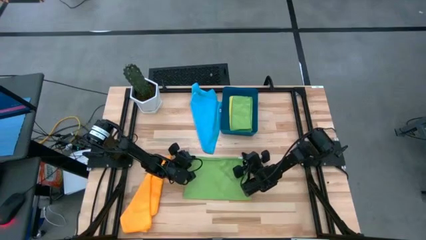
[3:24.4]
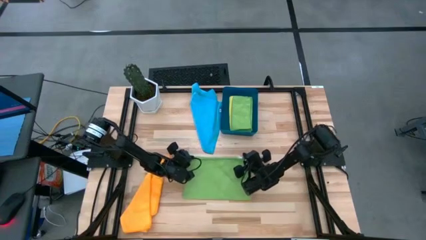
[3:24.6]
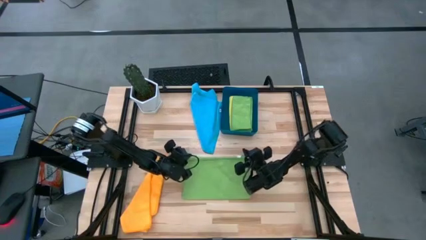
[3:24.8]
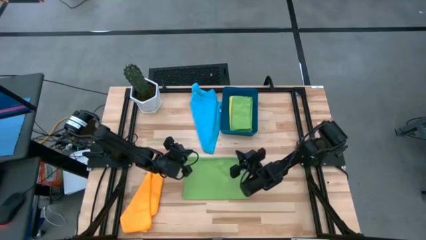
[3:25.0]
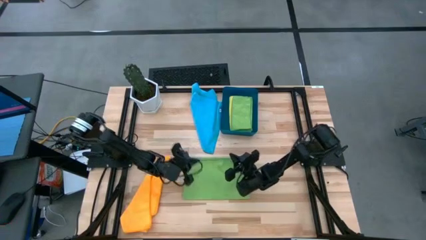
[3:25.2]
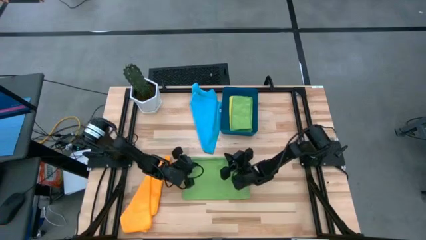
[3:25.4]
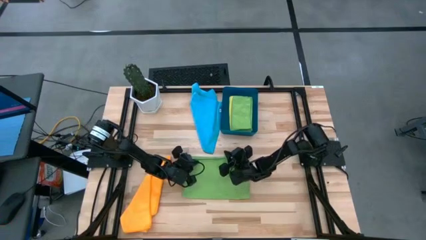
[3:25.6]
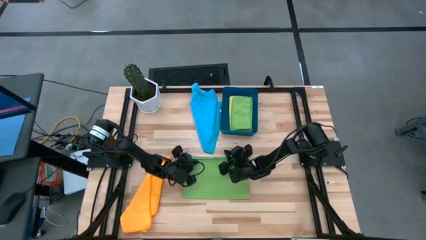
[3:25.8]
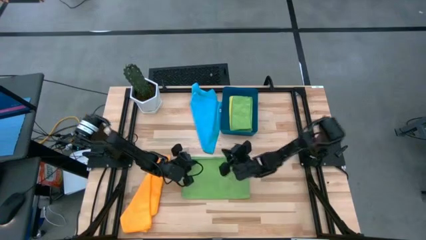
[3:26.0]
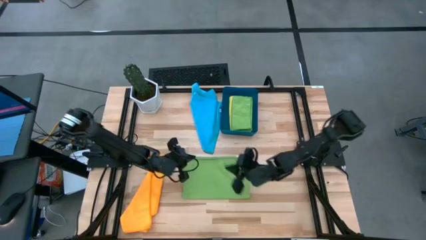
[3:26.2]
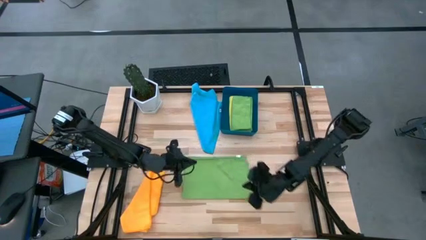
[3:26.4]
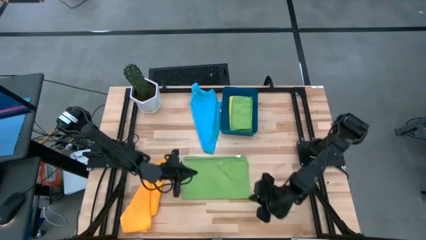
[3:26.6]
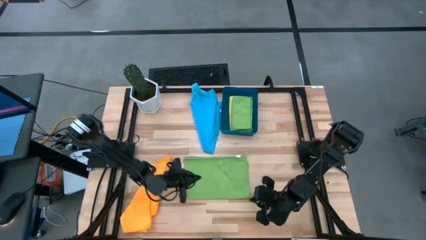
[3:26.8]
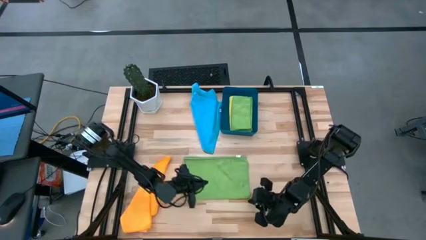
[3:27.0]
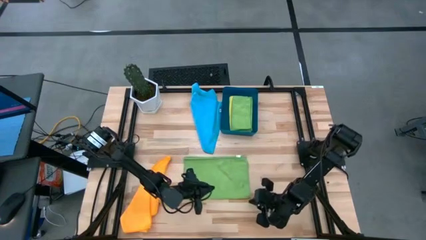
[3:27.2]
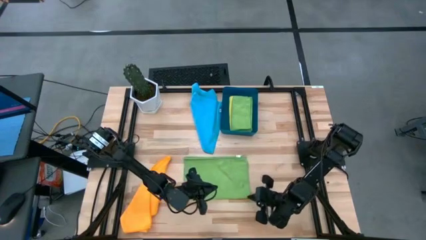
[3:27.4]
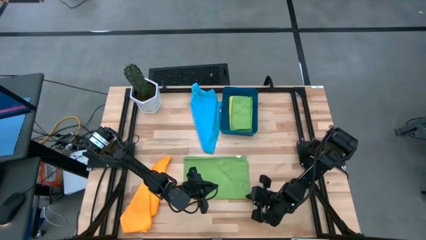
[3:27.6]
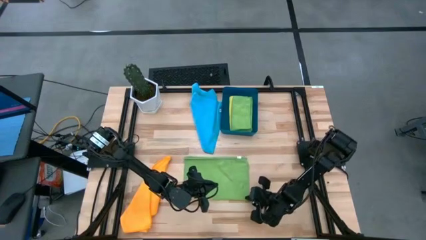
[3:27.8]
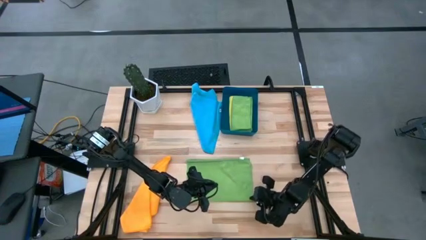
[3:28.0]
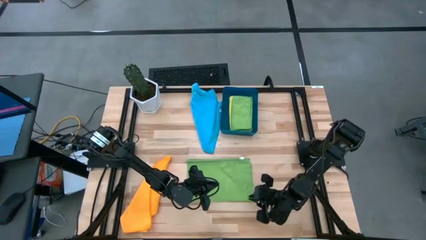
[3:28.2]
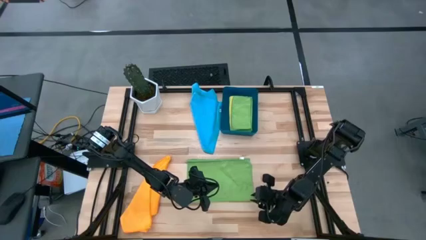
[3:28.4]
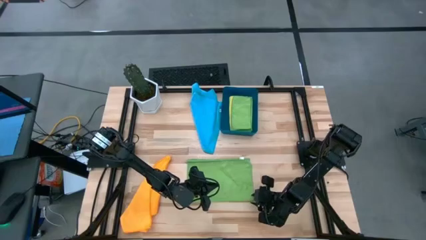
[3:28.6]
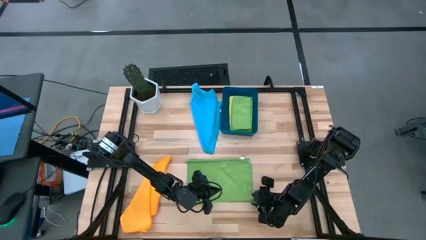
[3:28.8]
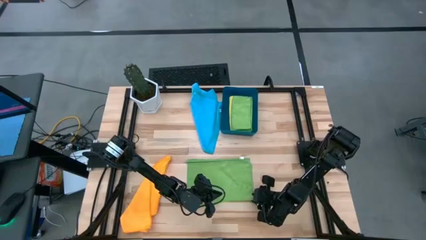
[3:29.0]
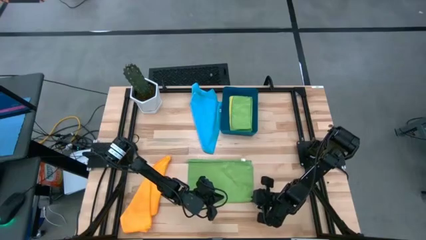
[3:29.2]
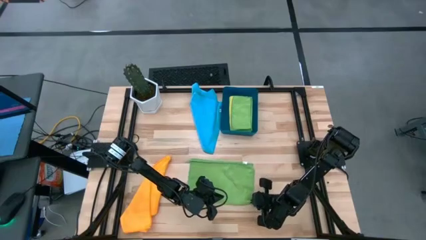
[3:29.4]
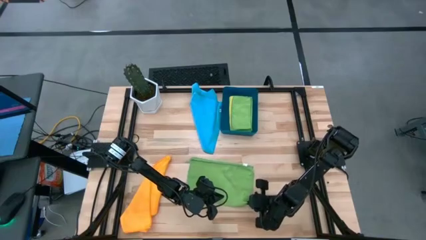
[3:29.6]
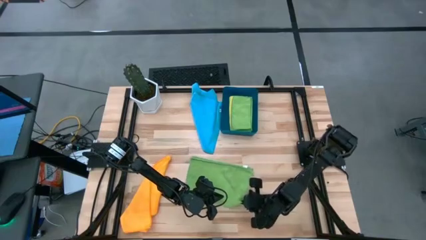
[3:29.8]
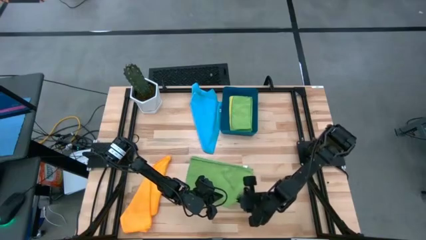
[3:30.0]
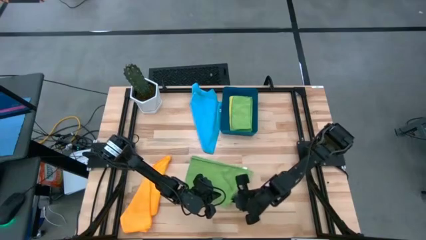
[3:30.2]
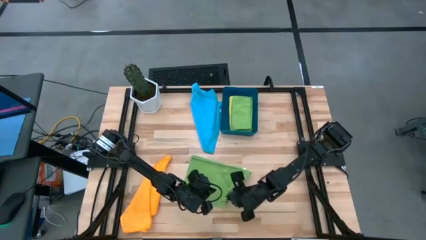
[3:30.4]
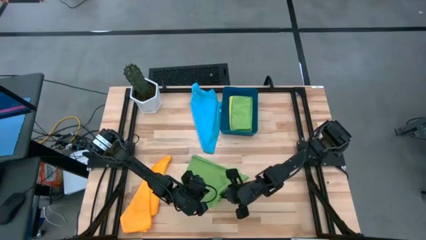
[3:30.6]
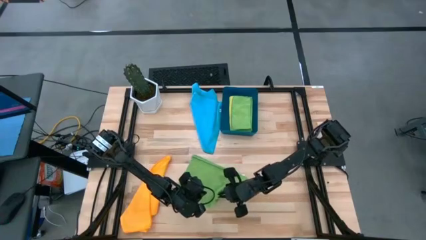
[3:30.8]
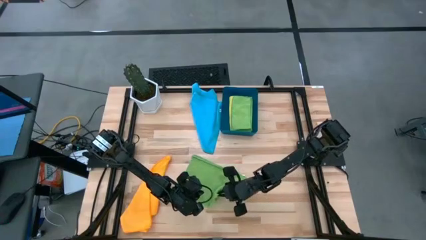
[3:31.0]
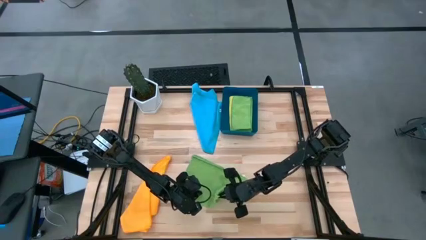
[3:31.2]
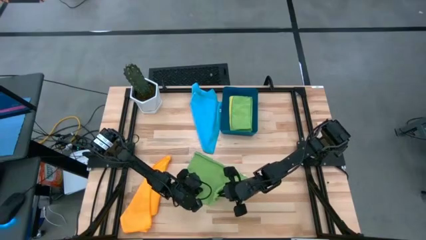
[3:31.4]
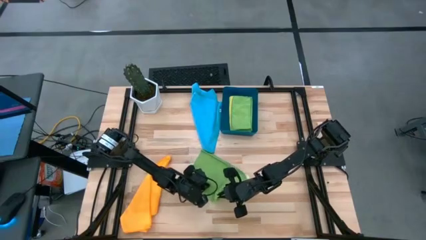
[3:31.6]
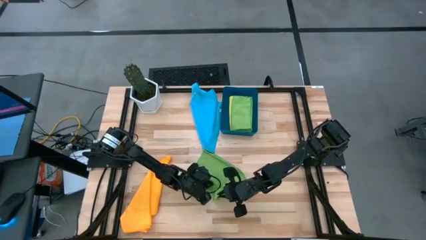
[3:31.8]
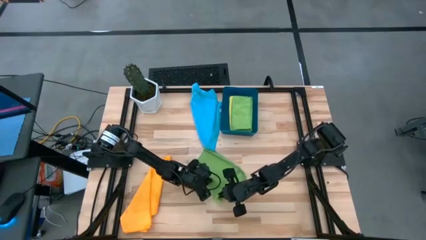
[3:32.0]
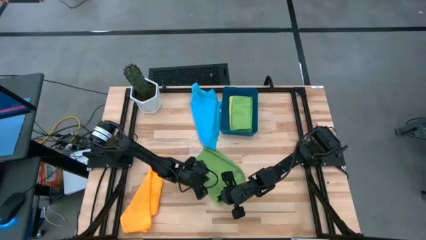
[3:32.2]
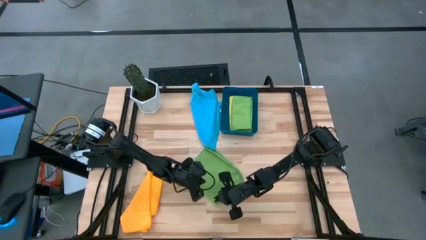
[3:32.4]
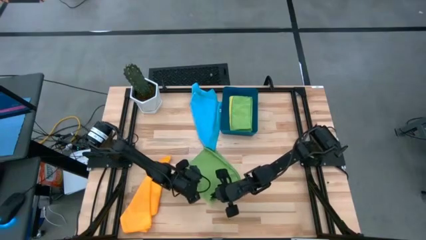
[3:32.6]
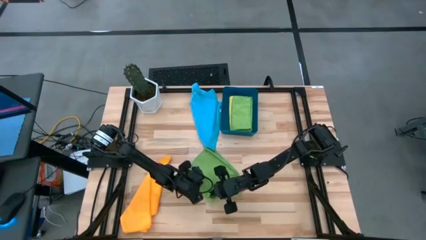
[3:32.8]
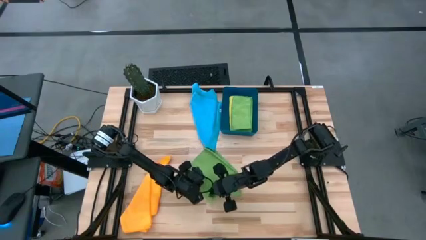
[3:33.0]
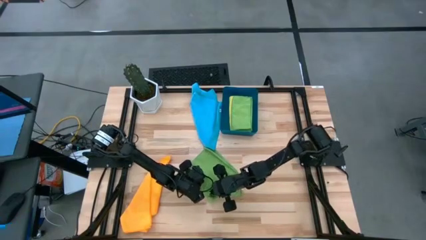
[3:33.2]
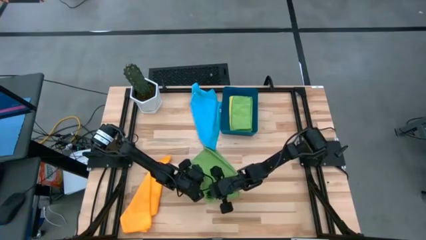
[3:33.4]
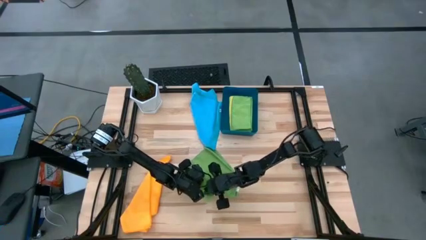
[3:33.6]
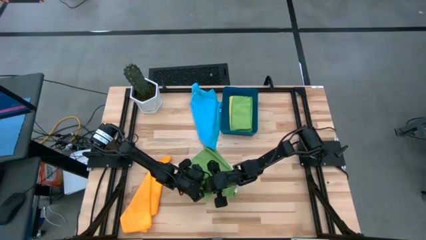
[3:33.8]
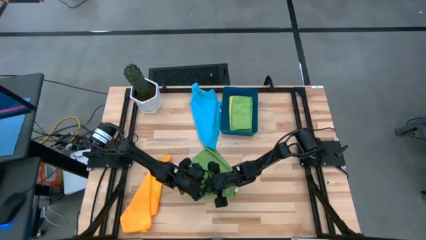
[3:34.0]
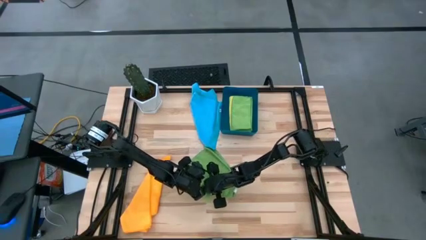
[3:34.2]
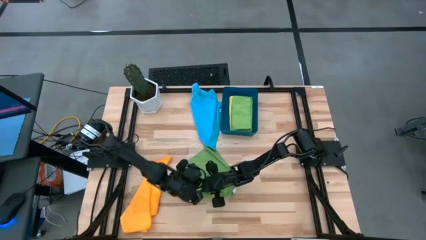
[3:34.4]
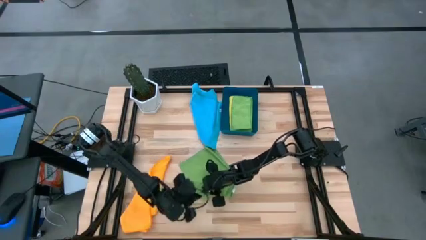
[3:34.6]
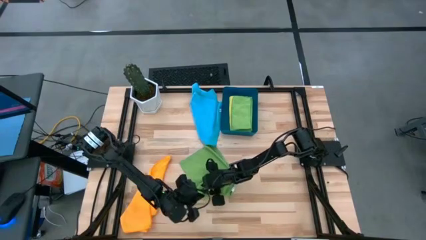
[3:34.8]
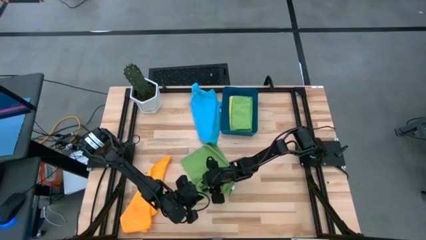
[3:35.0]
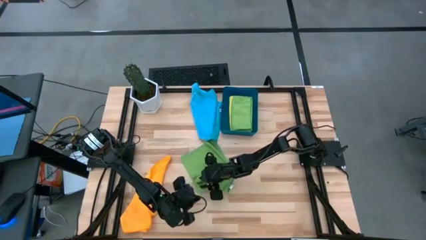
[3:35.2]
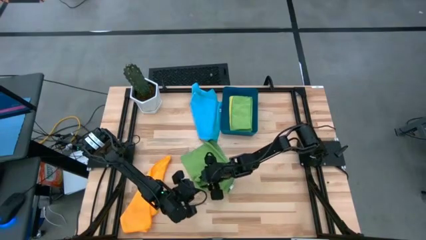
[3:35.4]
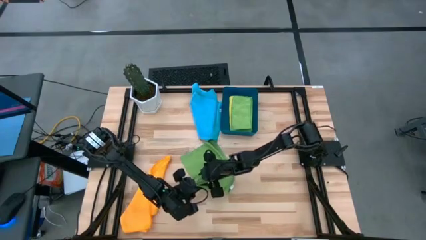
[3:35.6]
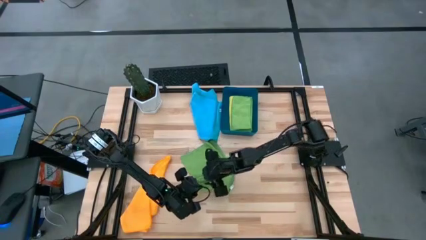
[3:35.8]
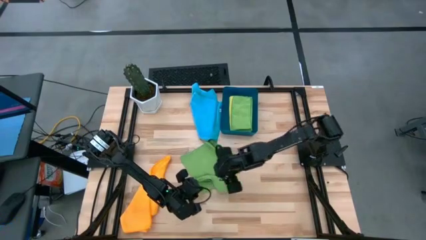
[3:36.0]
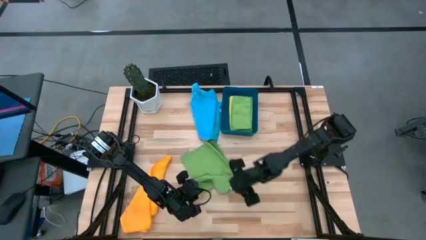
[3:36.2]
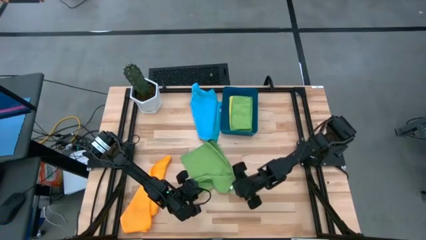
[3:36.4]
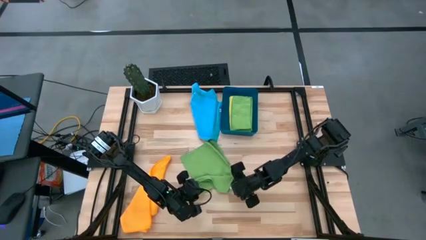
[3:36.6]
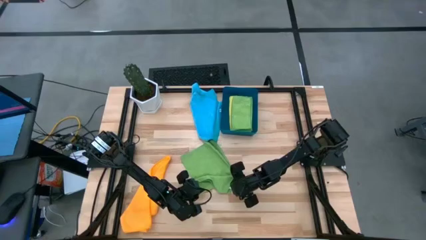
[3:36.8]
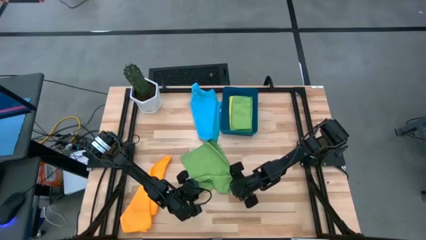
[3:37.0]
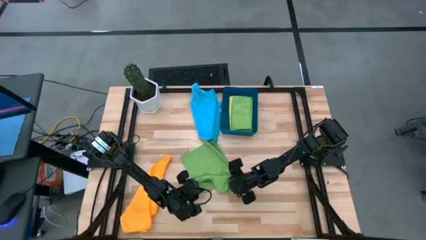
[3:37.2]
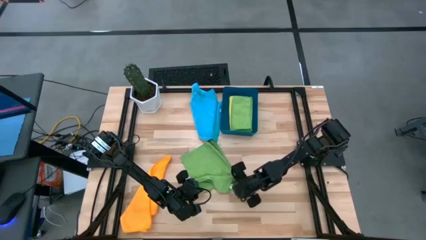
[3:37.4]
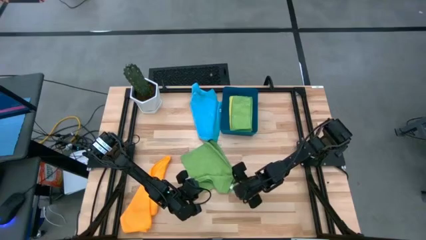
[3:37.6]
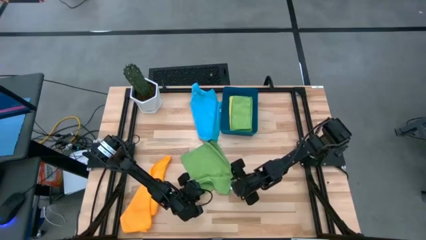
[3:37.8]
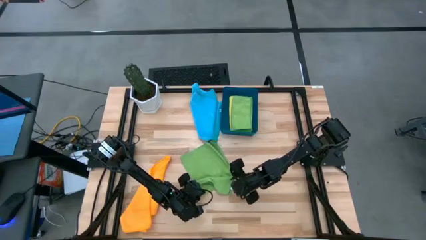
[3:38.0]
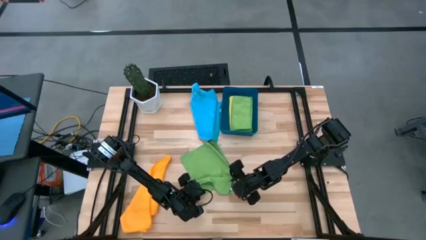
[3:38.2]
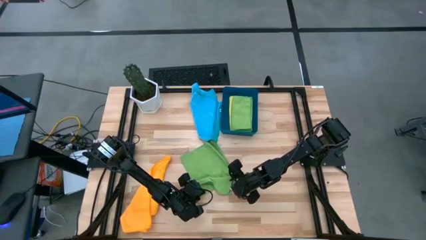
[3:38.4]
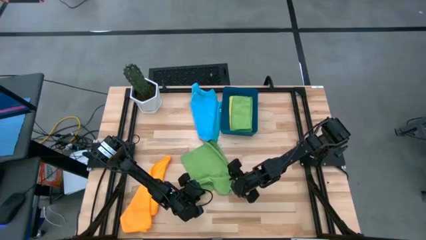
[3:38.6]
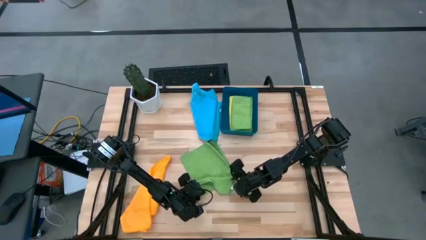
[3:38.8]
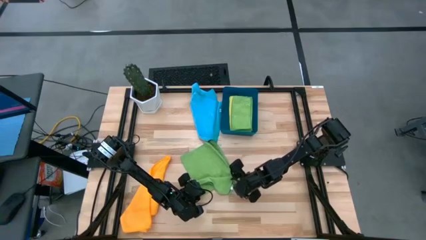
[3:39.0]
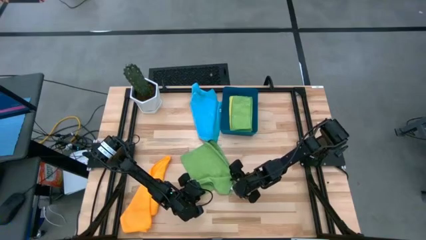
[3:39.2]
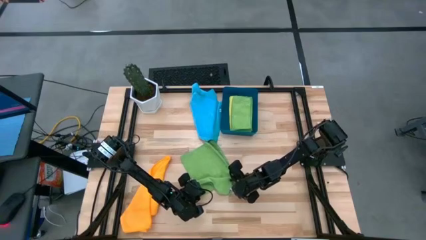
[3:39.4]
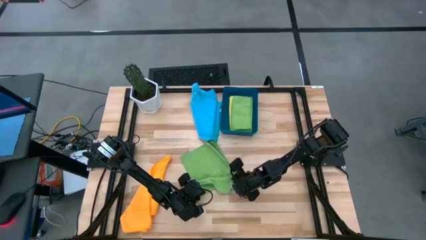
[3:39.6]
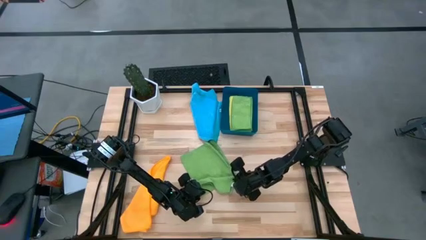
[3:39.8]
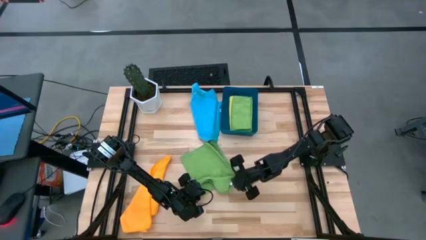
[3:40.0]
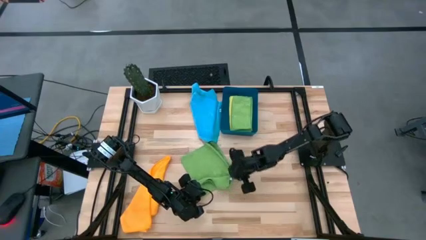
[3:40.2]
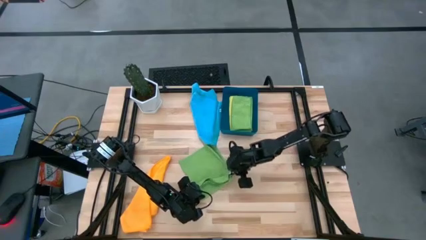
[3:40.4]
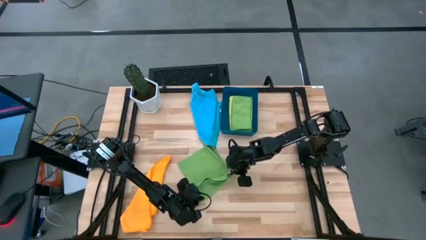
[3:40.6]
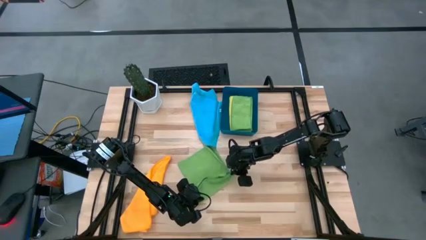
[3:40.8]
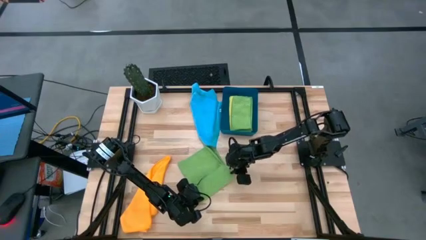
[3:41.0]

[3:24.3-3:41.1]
Task: Fold microfiber towels
Fold the green towel
